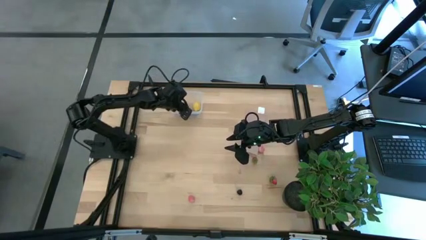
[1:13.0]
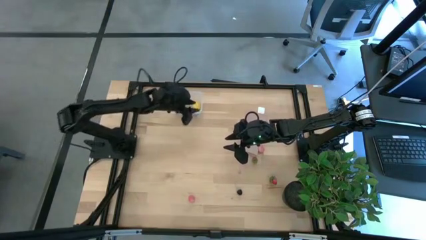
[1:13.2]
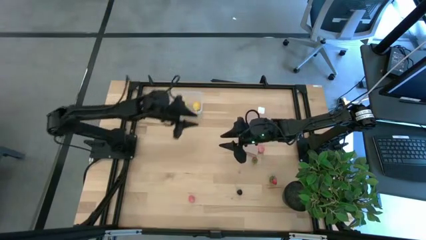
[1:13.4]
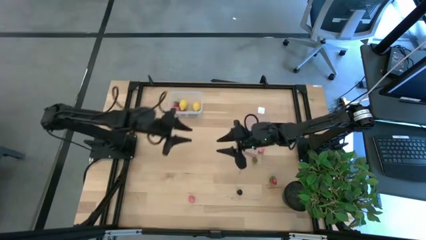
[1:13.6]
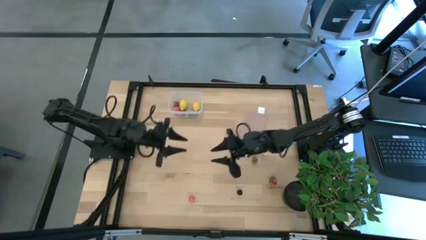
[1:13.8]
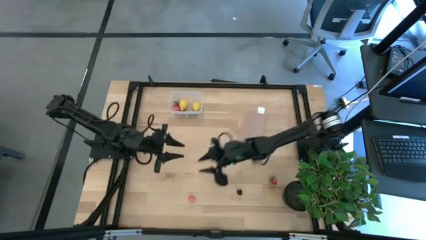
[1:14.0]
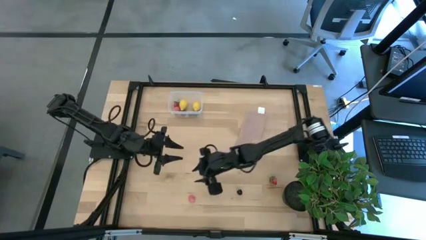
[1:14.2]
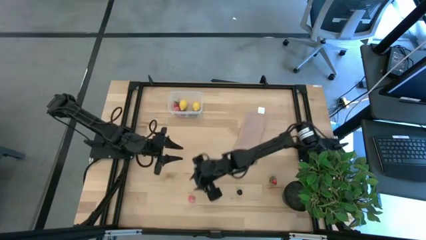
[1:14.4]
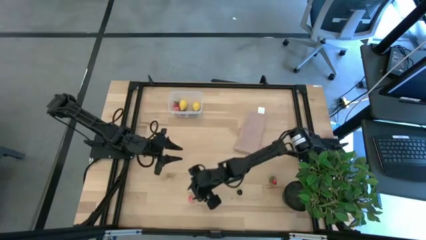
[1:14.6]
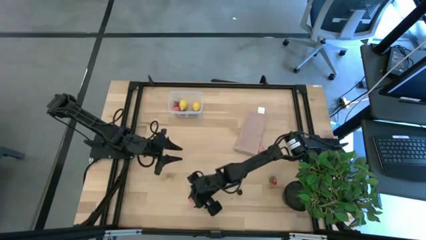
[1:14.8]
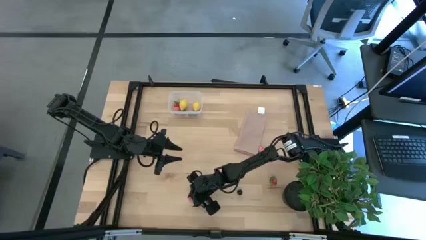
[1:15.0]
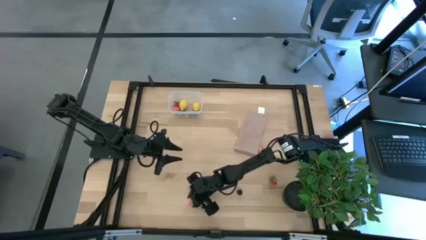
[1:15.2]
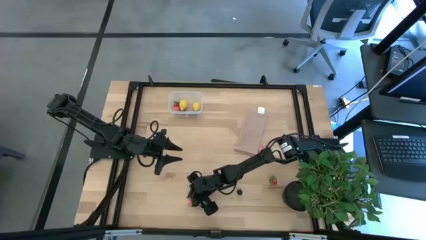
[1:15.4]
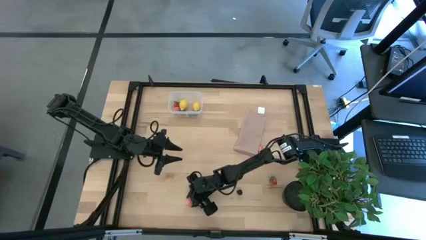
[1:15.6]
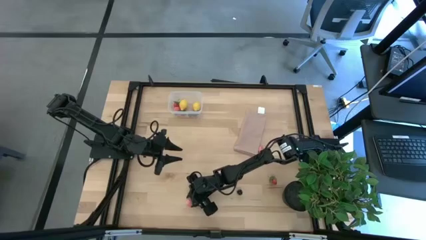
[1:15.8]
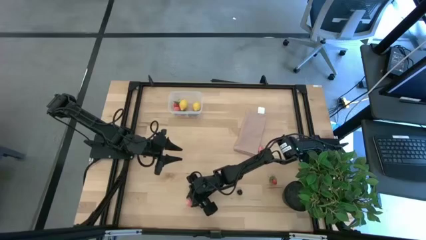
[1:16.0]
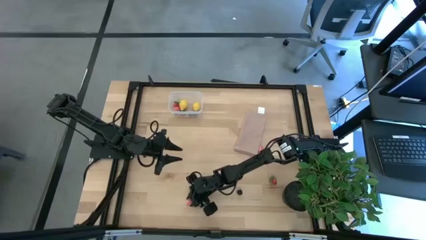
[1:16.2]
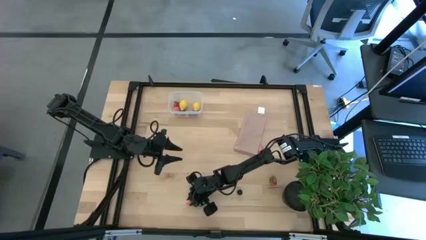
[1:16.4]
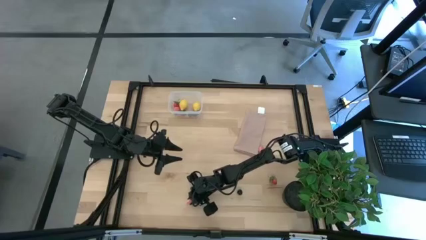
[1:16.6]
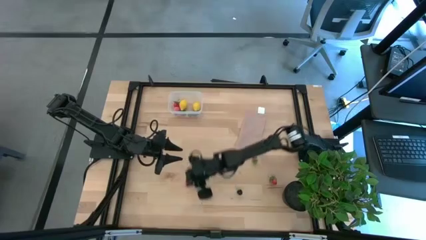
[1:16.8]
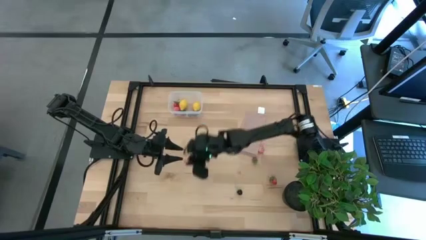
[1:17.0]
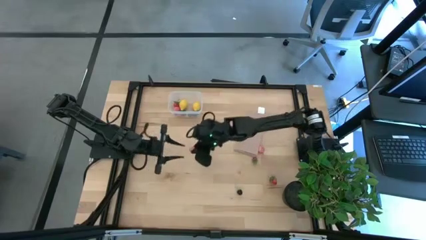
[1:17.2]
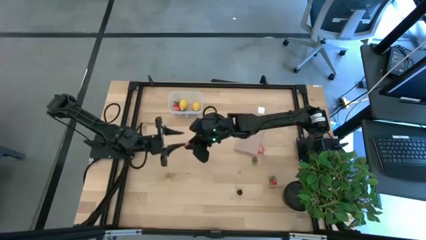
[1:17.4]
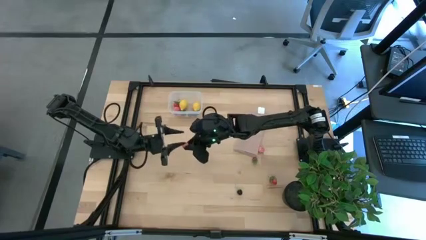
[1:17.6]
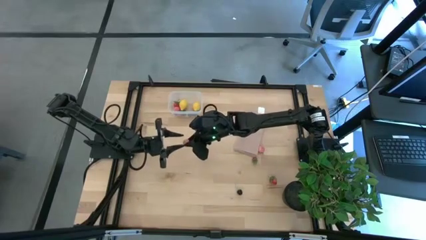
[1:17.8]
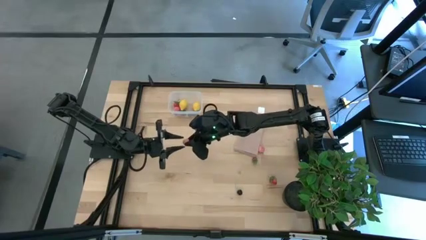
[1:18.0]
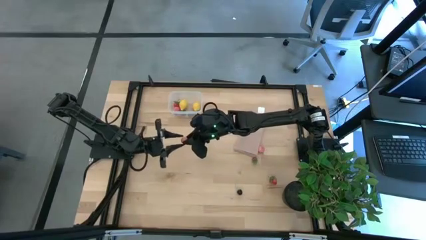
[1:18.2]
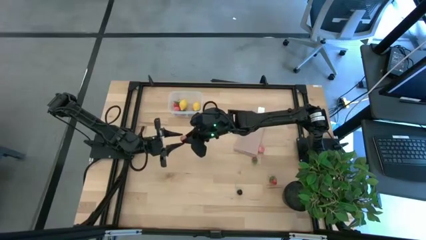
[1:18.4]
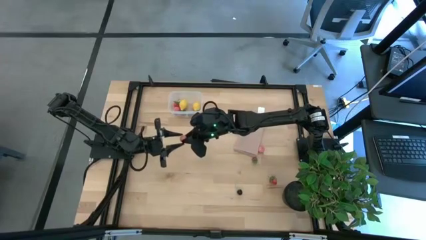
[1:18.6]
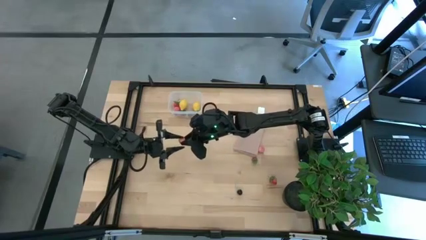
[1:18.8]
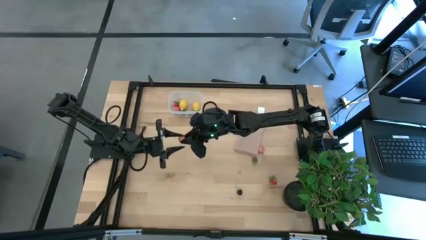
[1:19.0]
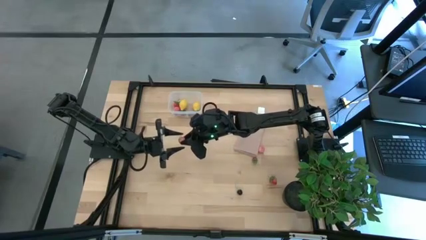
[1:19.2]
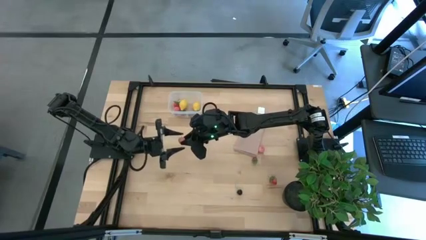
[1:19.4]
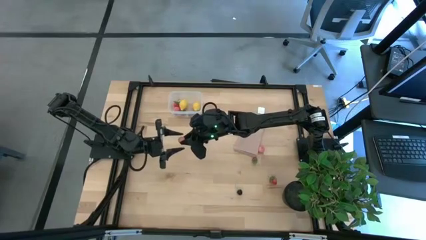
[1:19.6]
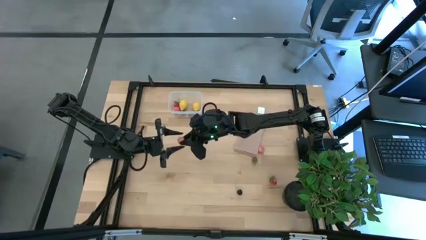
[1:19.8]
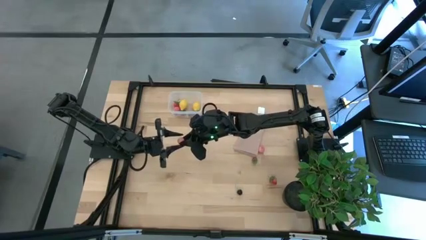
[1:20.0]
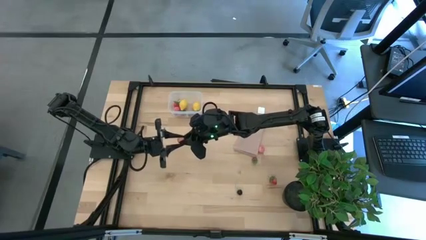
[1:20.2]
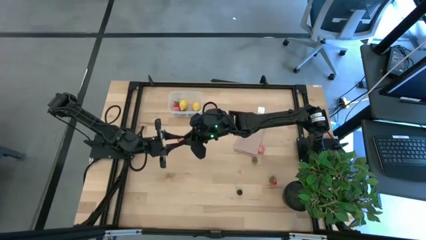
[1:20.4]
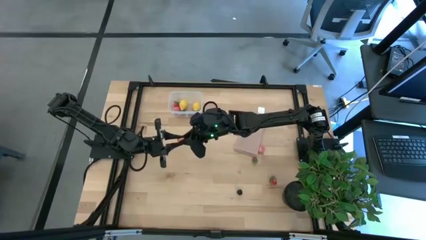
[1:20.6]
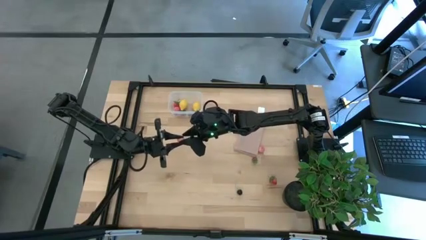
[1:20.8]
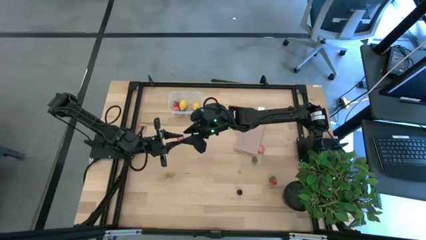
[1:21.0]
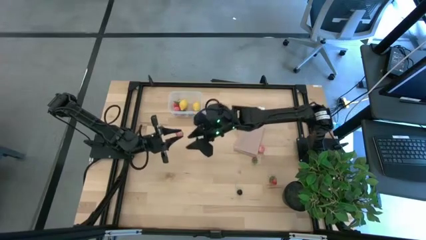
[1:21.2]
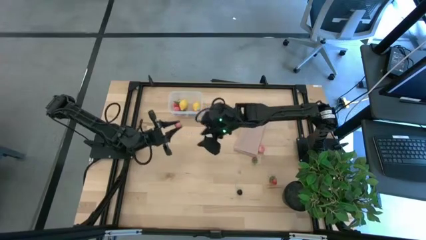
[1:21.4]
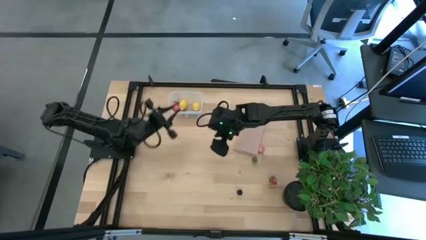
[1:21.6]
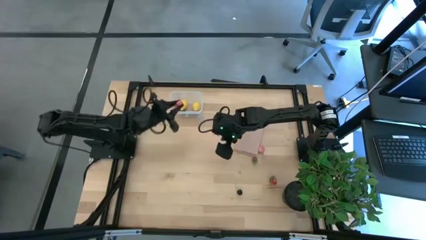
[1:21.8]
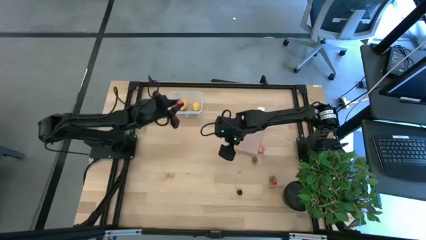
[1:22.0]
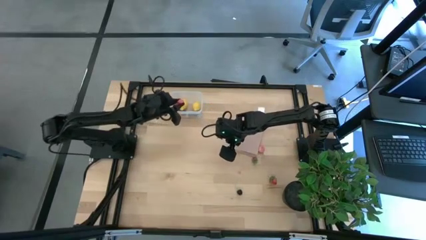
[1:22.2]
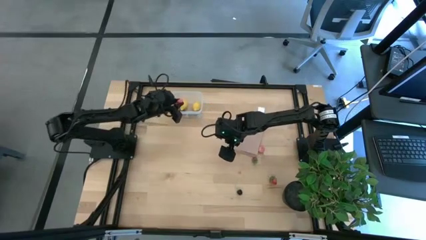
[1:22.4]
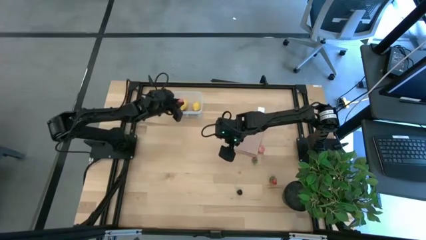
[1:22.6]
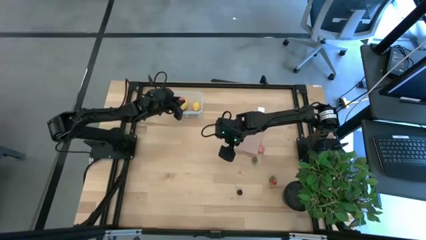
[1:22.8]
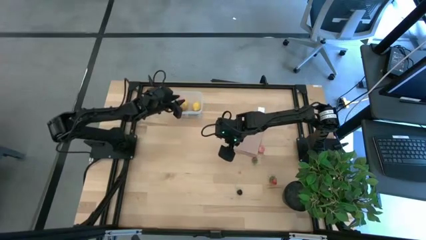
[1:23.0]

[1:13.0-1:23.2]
Task: Pick and placing Produce into tupperware
Put the peach into the transparent bin

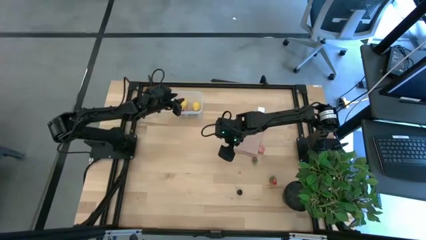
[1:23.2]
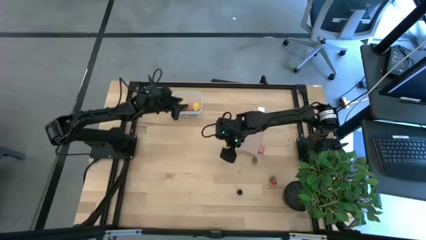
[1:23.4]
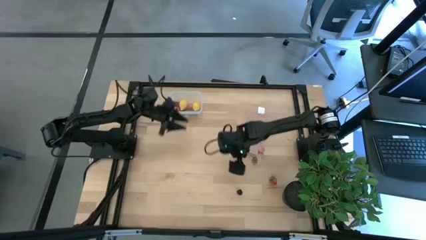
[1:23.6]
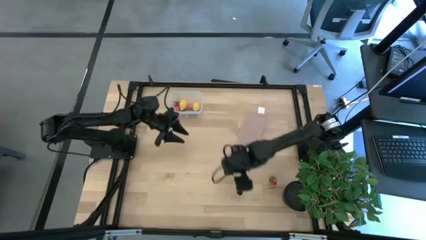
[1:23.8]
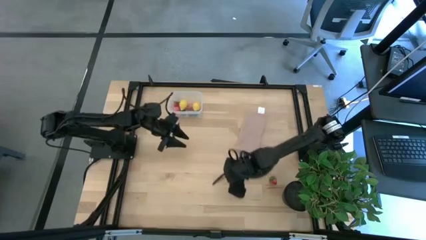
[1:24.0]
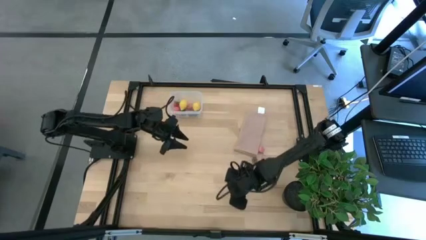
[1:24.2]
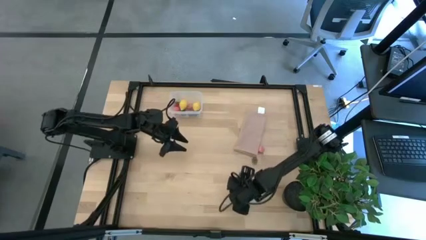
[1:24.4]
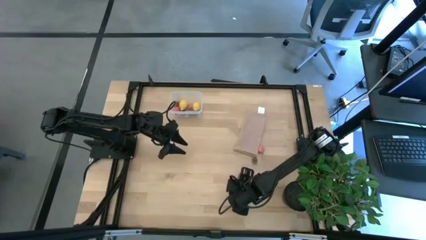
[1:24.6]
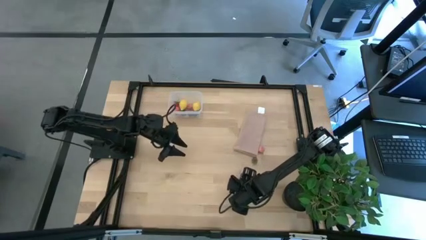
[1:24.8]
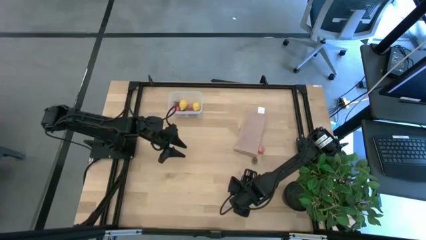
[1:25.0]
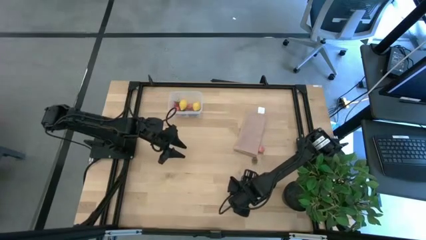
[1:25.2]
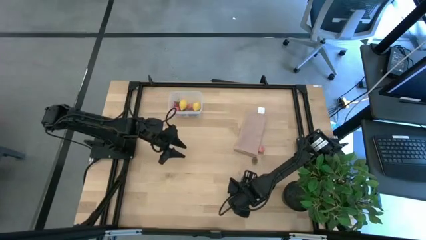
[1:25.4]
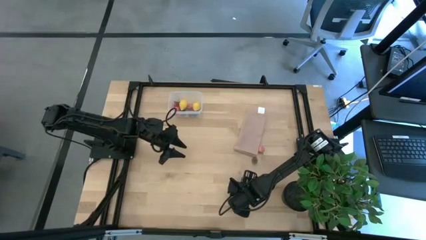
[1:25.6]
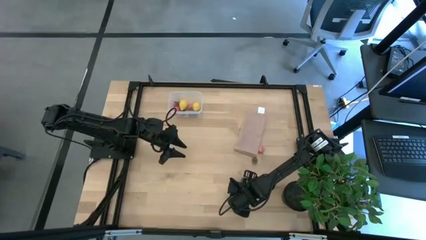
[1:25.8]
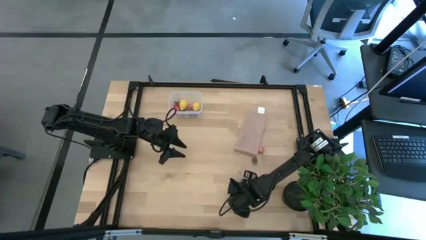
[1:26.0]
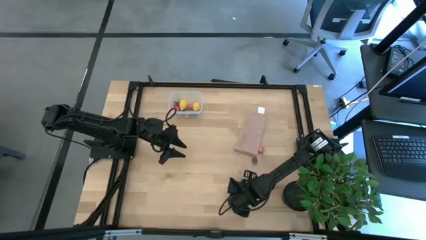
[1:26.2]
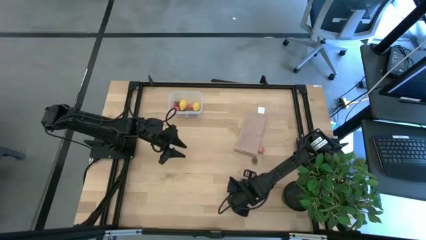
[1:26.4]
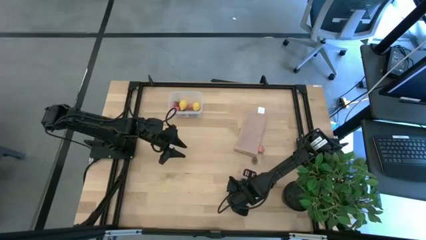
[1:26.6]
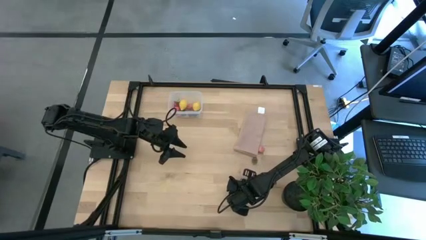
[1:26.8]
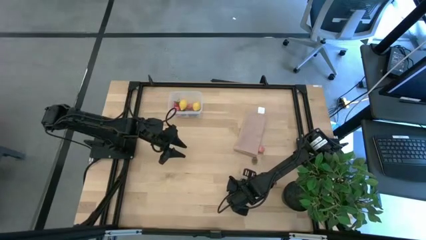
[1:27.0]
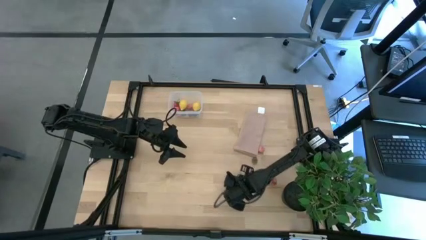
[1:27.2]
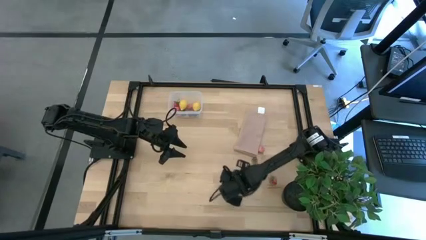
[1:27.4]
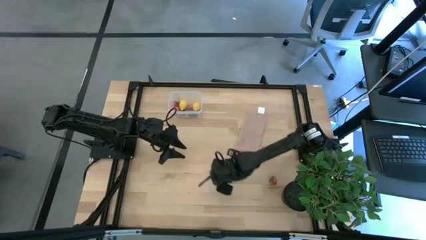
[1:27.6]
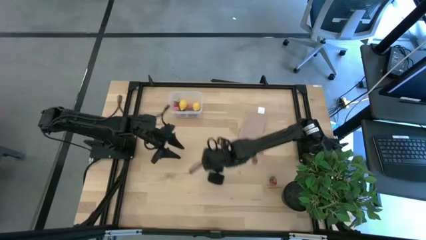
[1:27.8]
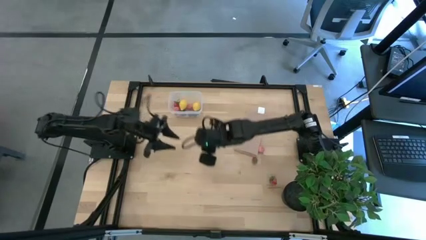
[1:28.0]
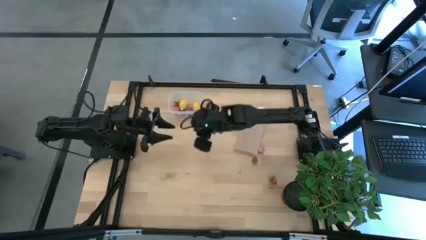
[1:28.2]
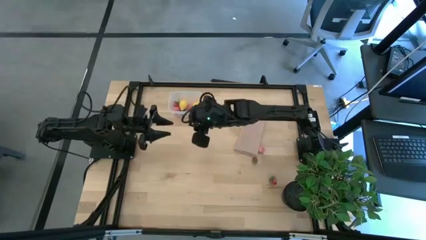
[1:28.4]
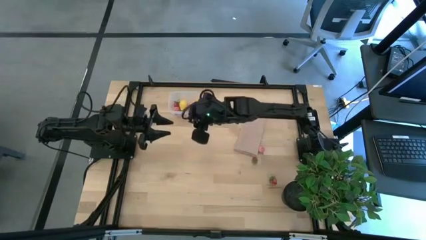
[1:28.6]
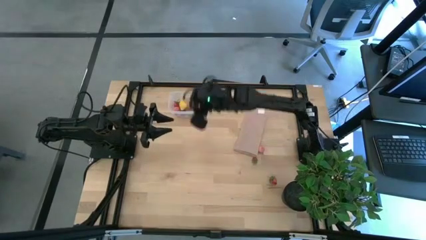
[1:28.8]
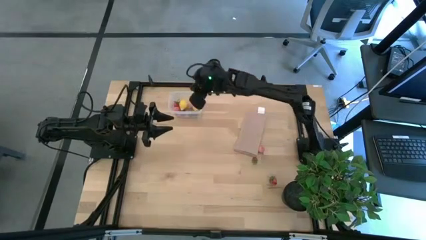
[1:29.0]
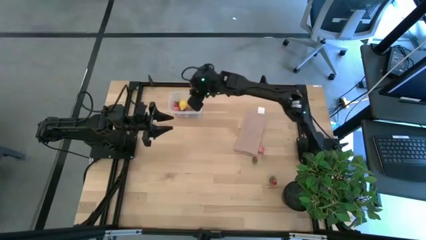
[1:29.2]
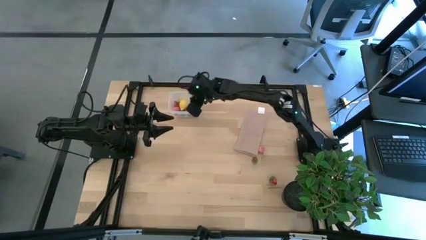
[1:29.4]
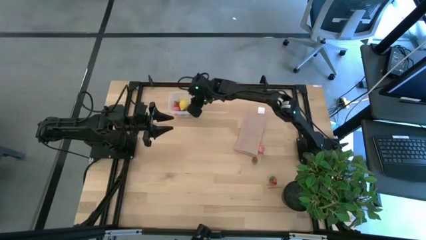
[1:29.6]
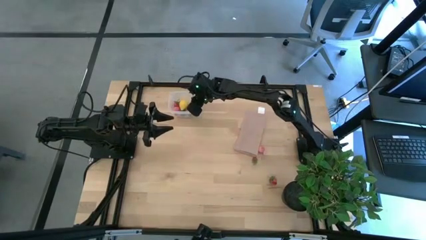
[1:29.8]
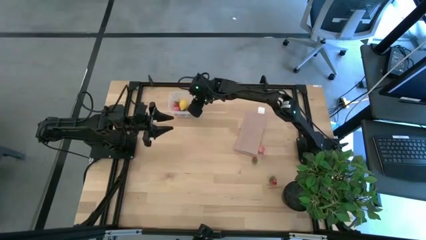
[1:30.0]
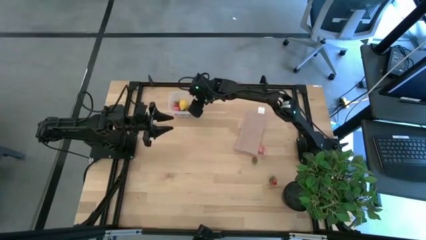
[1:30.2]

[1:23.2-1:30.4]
Put the black cherry into the transparent bin
